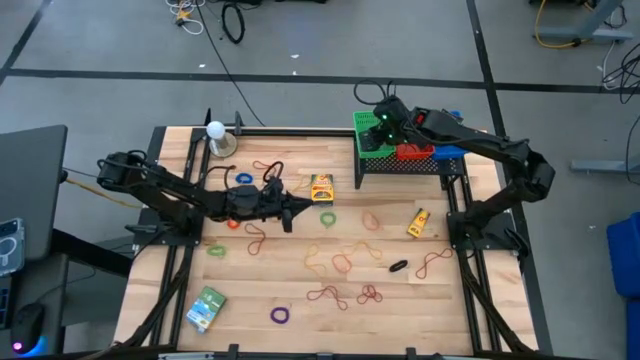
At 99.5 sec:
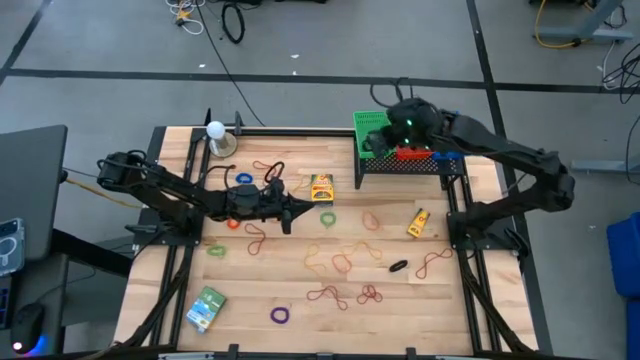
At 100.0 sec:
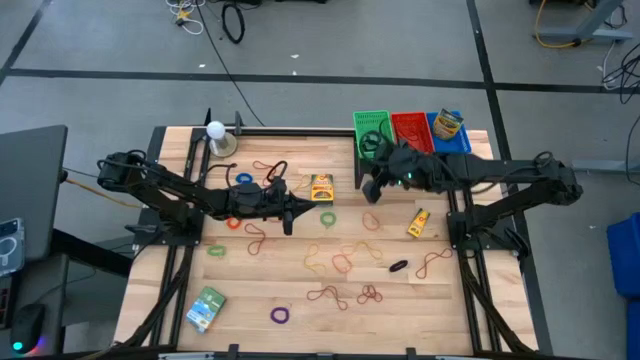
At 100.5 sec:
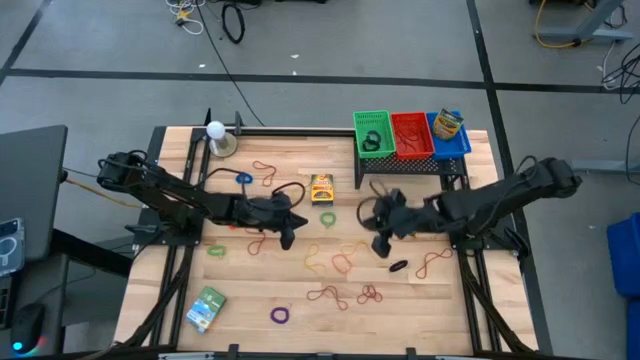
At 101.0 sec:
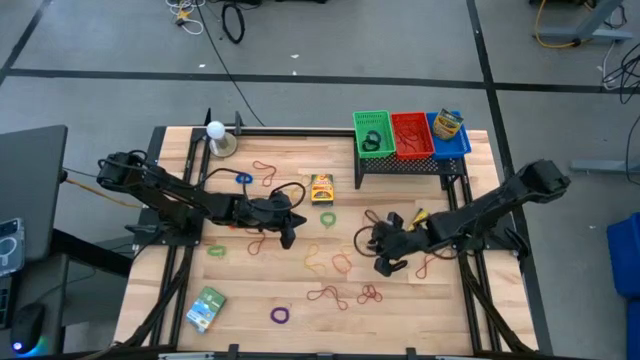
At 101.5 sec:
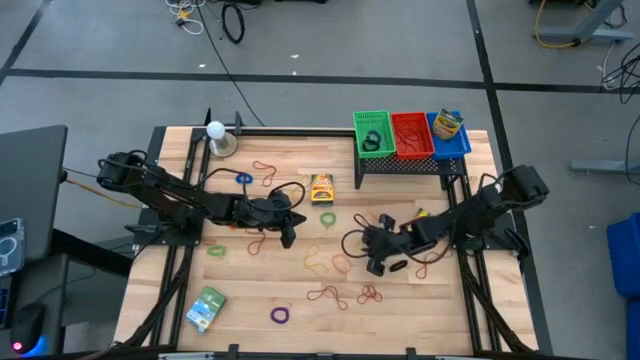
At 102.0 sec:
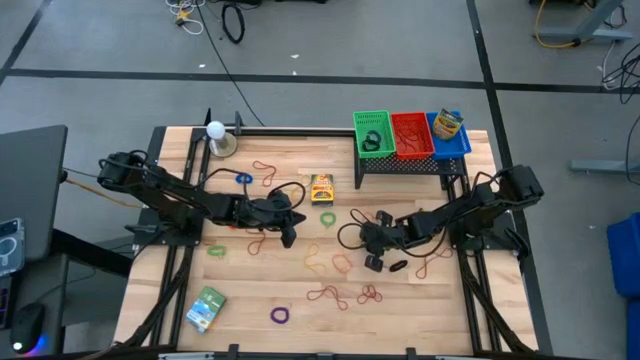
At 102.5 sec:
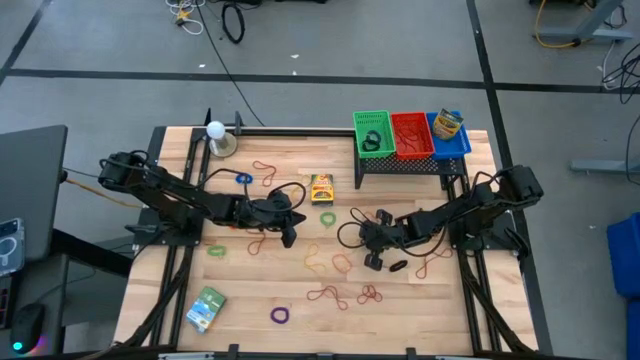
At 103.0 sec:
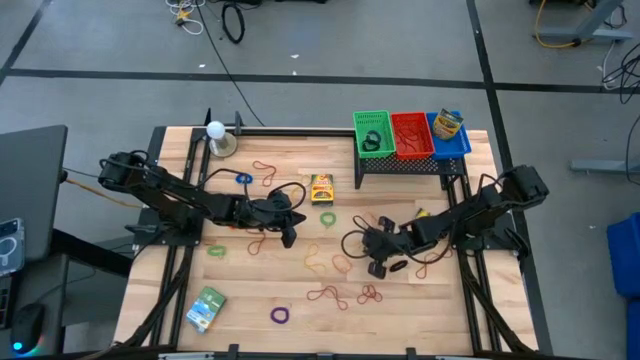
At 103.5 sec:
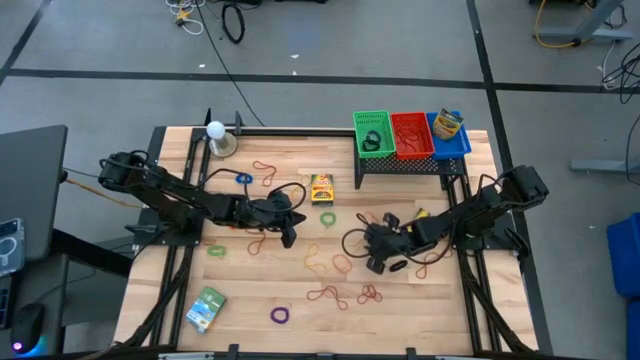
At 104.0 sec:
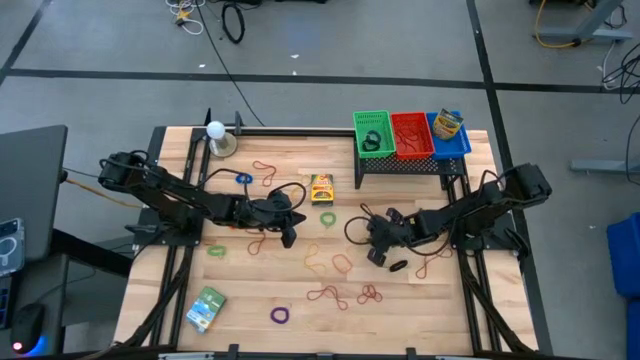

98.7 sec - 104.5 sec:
Task: Pick & Place Office Desk Supplies
Put the yellow rubber band into the red bin

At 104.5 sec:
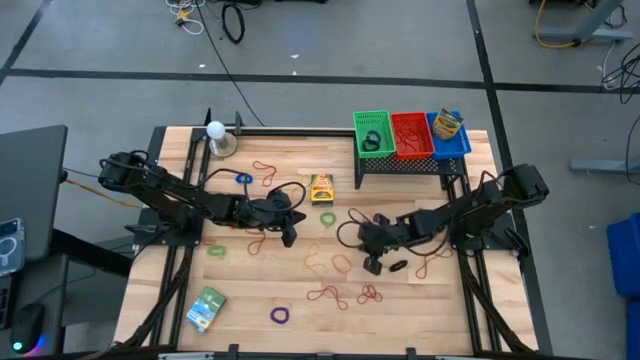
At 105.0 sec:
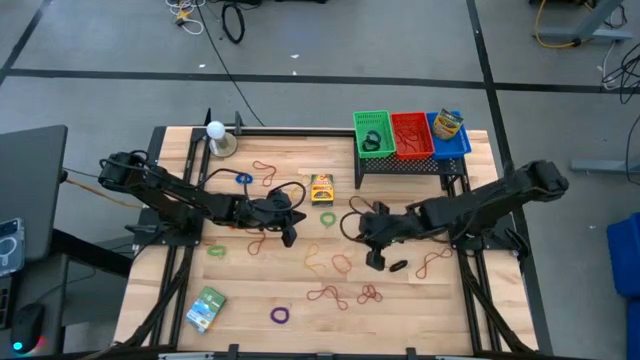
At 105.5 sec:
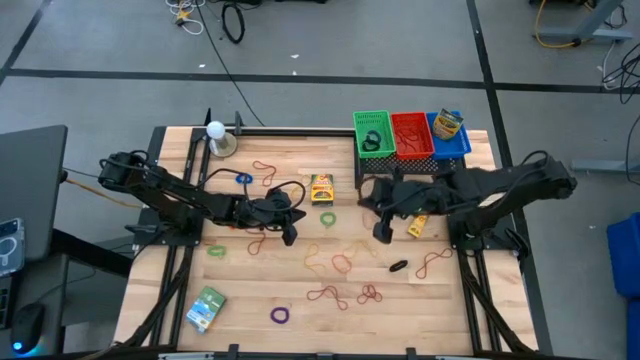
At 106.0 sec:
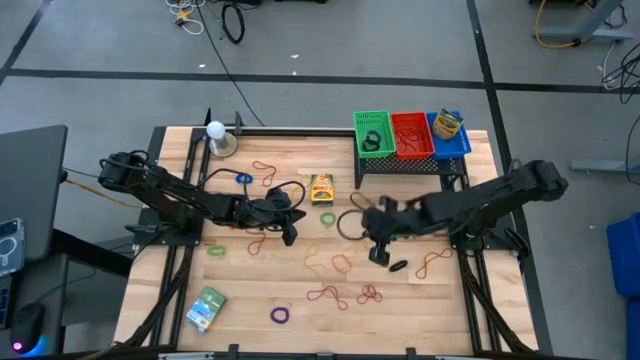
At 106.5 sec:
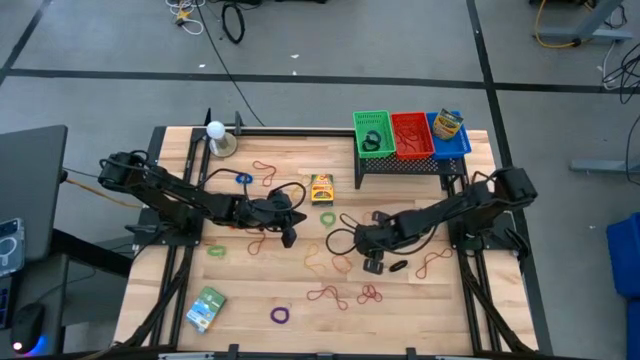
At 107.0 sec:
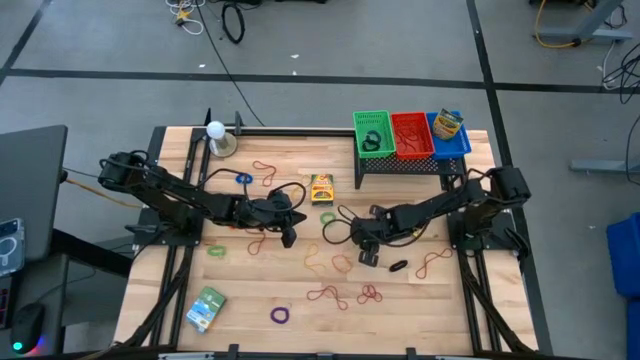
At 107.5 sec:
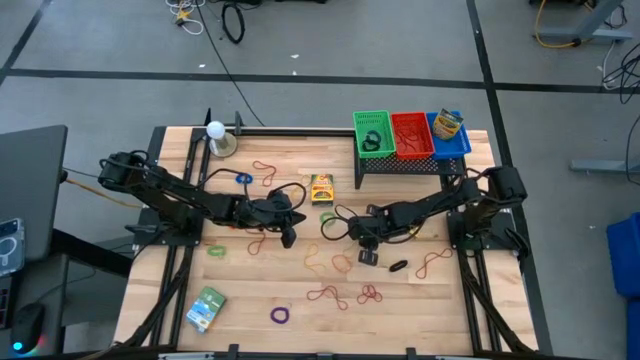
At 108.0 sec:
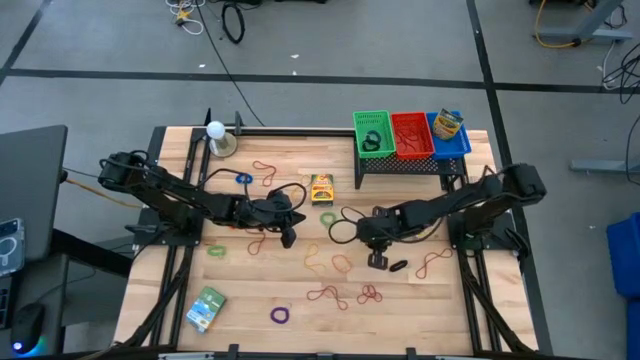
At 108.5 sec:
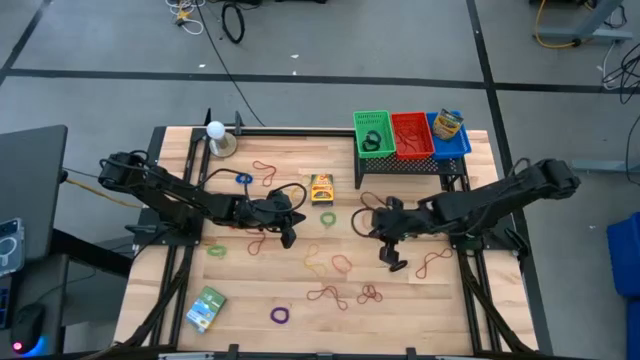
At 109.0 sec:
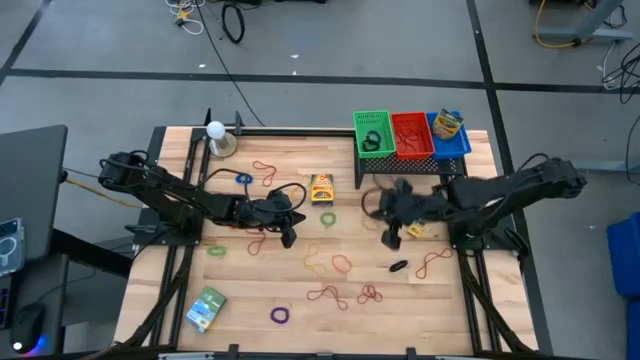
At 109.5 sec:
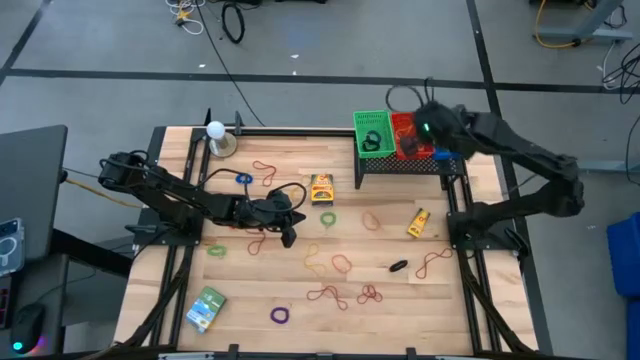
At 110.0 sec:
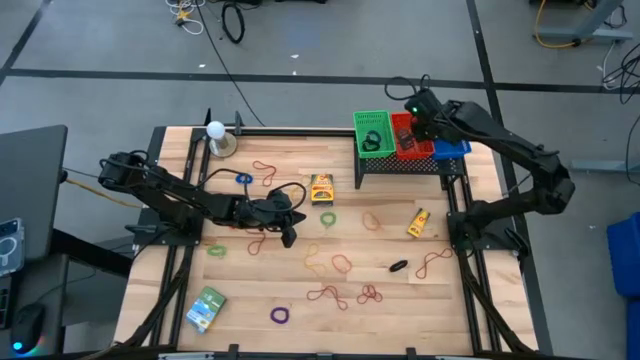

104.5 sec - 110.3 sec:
Put the yellow rubber band into the red bin

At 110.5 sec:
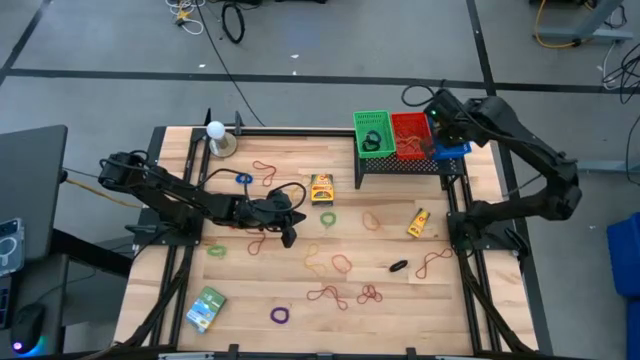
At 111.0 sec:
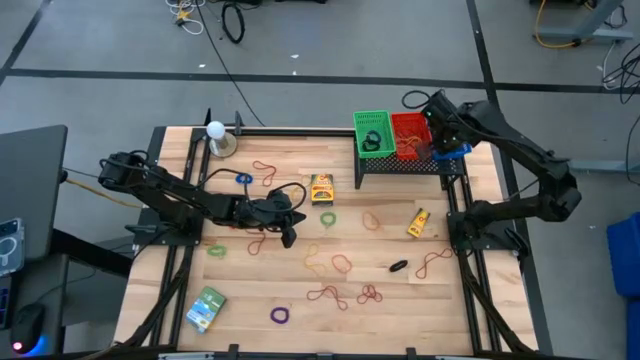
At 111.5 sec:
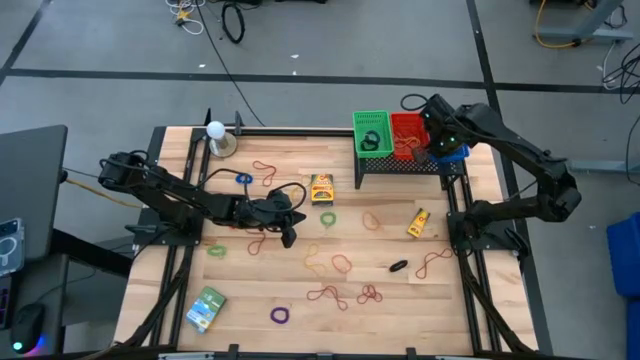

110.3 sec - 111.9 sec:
Adjust the red bin

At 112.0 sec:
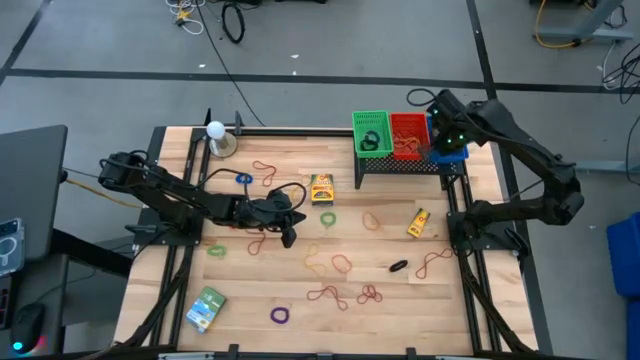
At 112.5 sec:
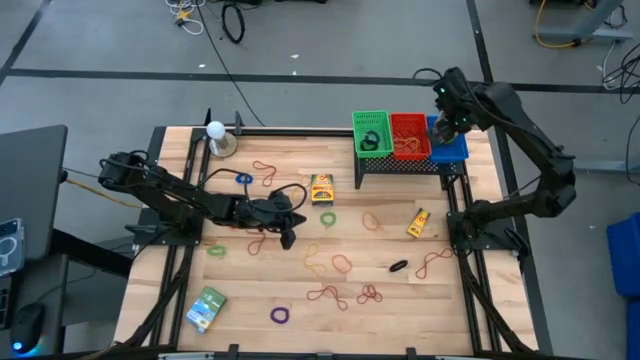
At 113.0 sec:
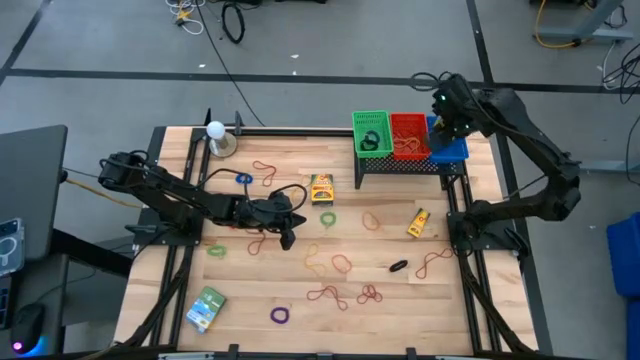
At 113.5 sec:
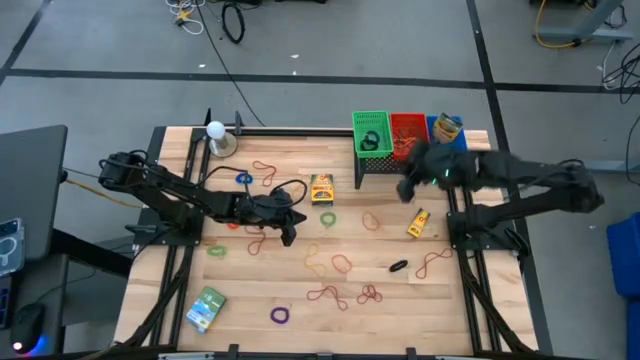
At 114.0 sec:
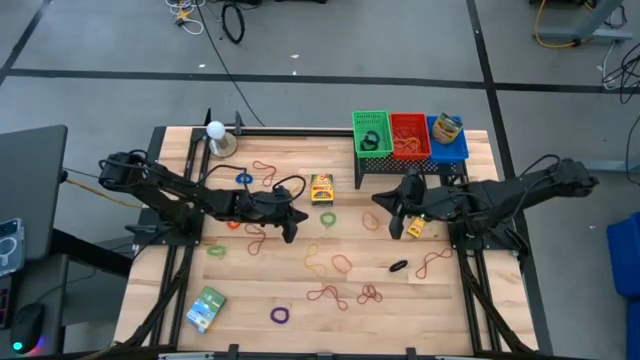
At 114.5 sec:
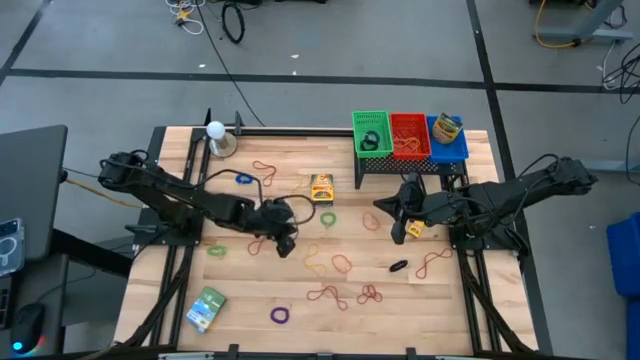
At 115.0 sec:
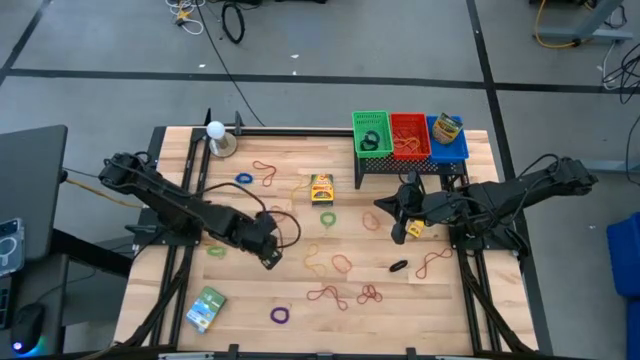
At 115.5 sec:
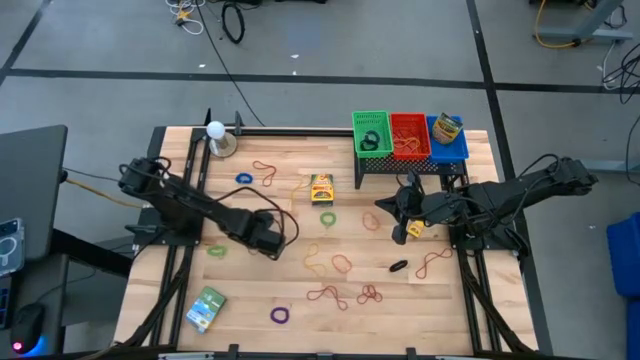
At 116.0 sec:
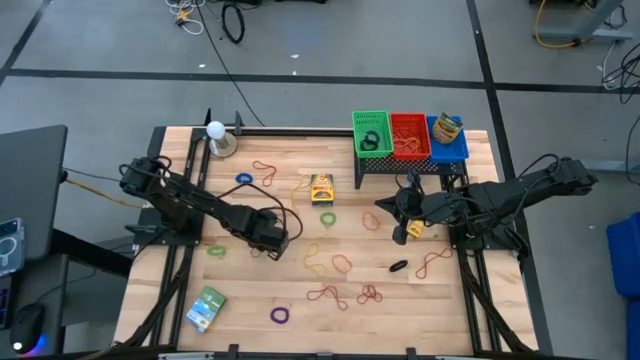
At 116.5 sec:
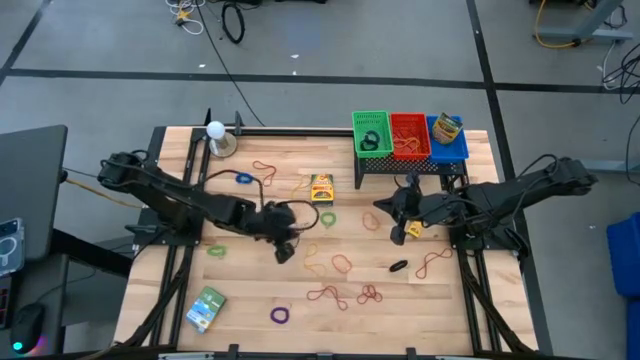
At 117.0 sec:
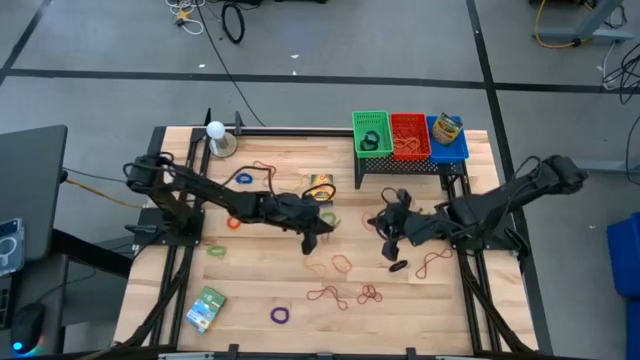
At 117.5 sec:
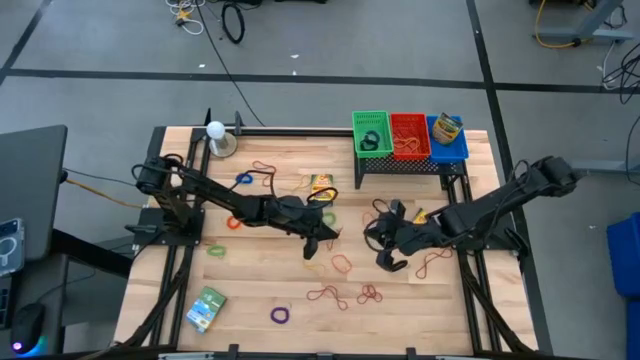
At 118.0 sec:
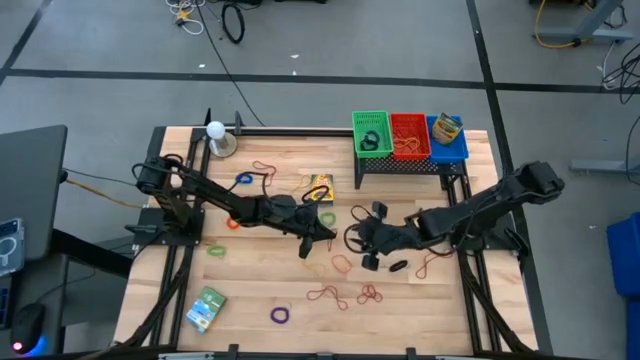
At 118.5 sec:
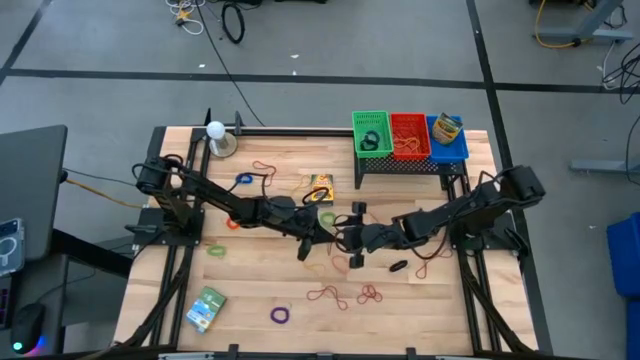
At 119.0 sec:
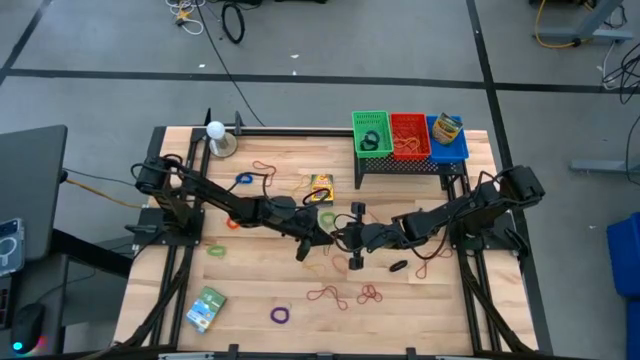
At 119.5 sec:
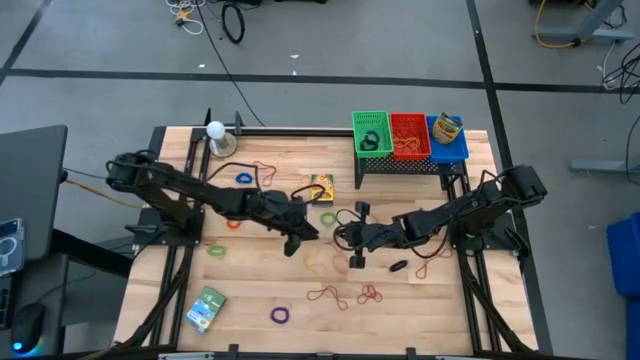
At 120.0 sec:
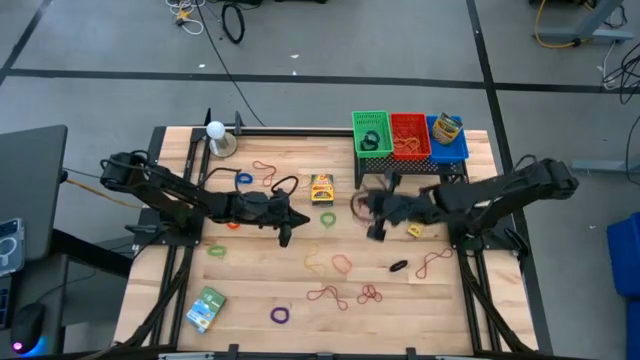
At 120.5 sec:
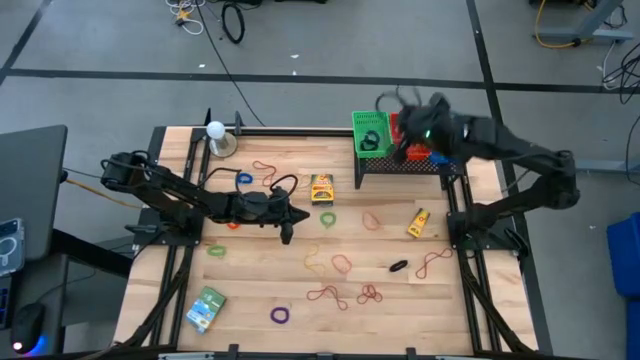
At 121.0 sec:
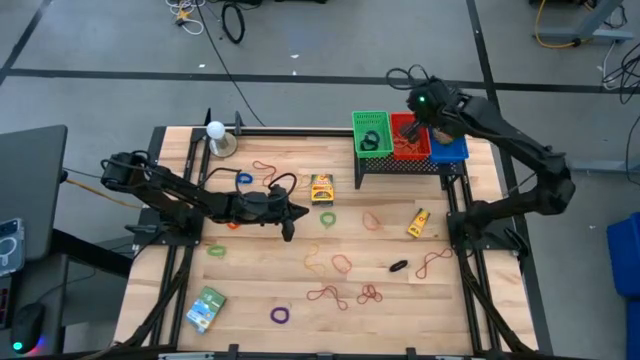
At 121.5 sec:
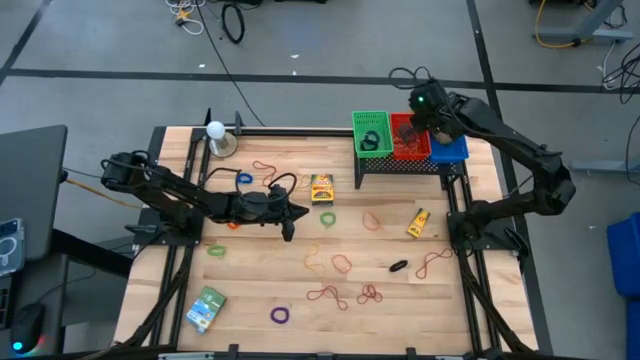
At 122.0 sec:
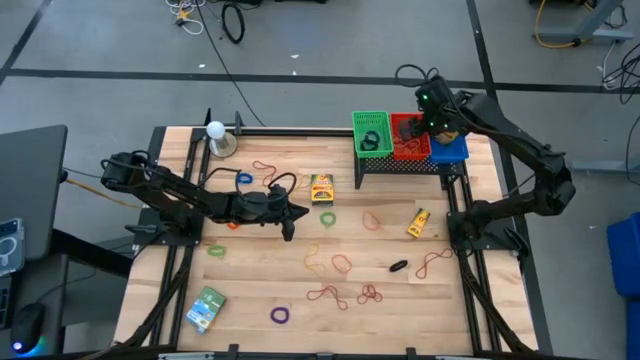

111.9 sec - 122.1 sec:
Put the red rubber band into the red bin
